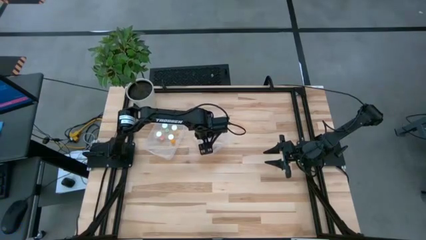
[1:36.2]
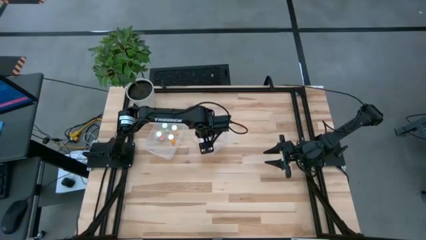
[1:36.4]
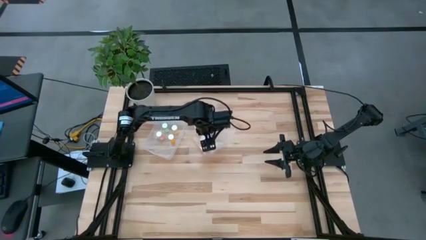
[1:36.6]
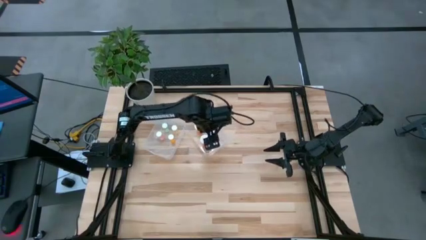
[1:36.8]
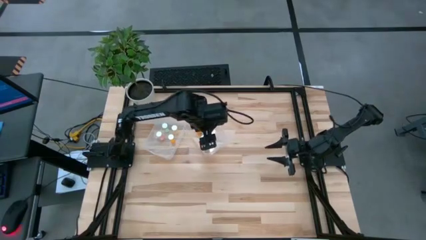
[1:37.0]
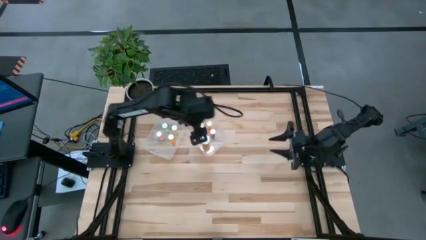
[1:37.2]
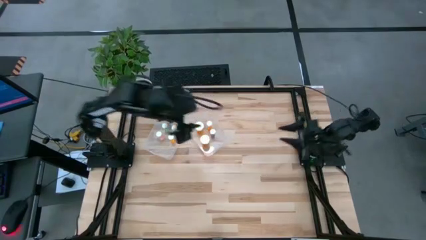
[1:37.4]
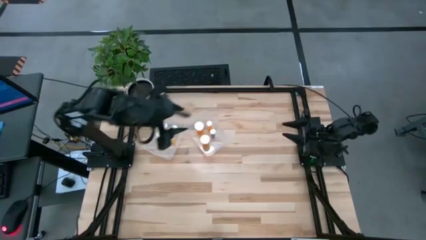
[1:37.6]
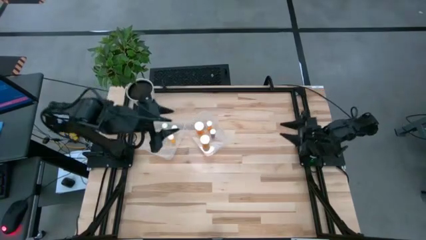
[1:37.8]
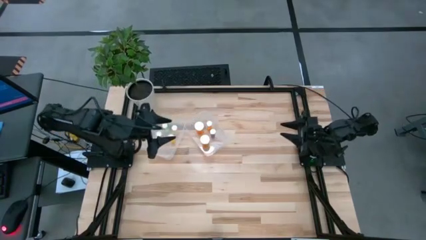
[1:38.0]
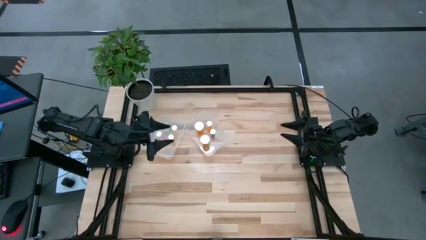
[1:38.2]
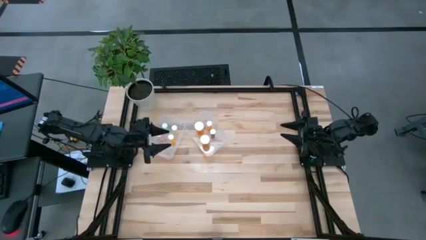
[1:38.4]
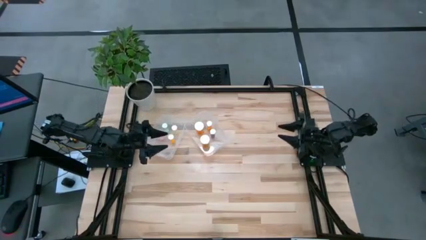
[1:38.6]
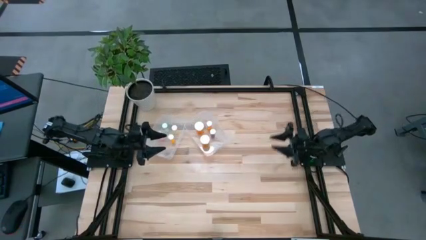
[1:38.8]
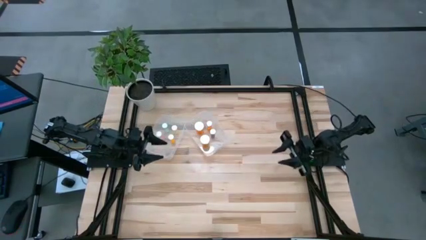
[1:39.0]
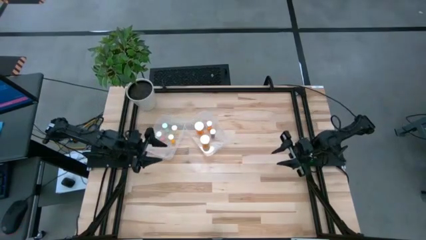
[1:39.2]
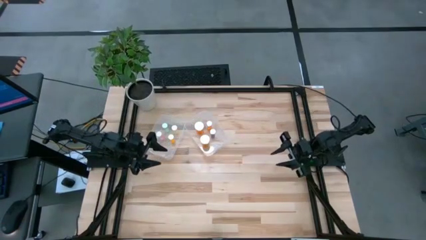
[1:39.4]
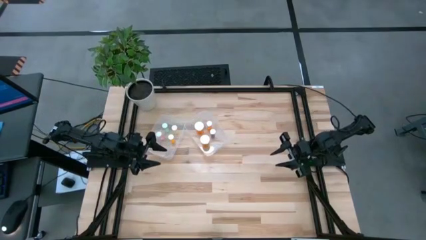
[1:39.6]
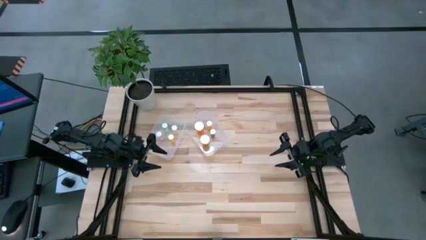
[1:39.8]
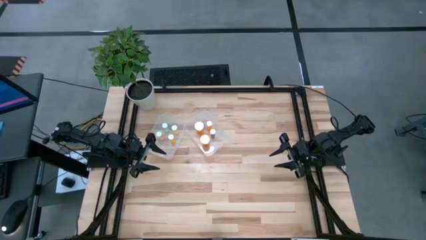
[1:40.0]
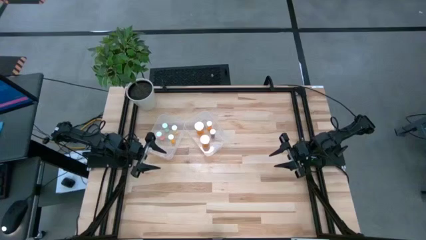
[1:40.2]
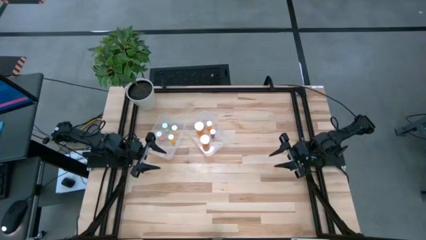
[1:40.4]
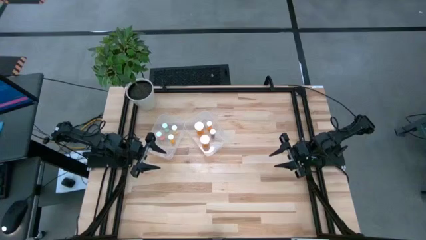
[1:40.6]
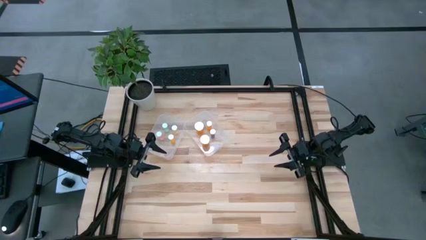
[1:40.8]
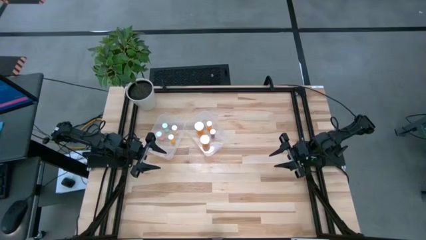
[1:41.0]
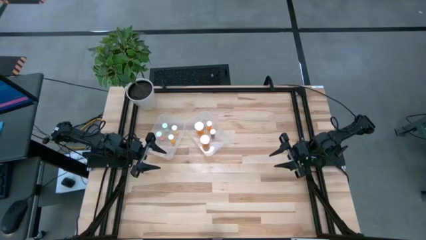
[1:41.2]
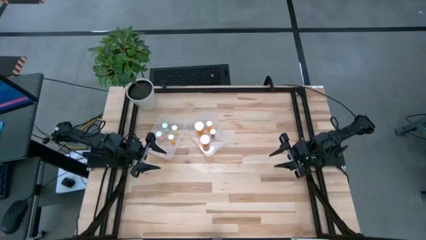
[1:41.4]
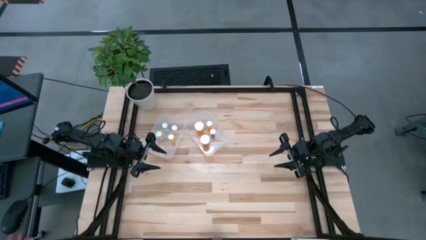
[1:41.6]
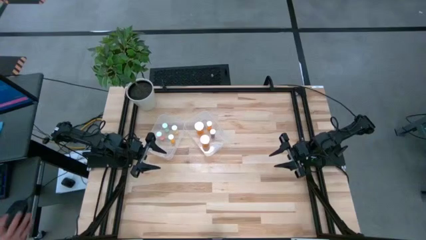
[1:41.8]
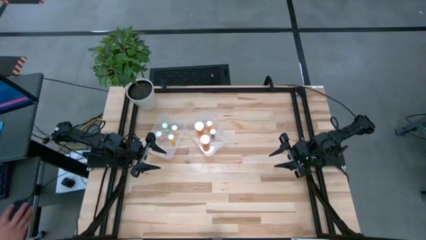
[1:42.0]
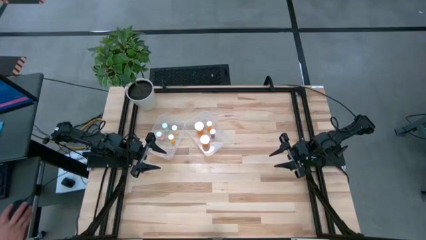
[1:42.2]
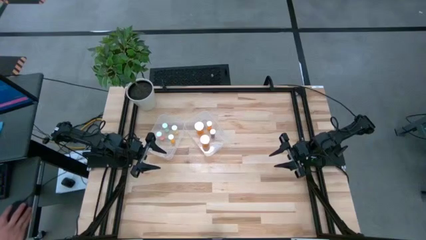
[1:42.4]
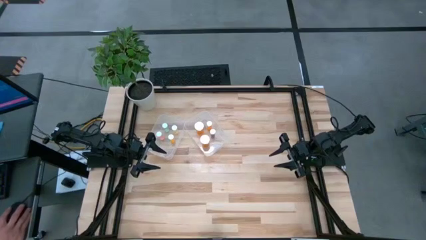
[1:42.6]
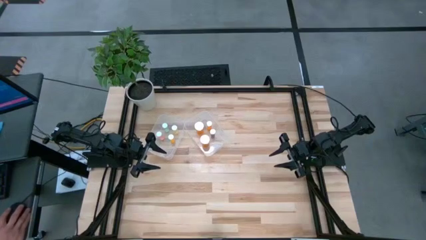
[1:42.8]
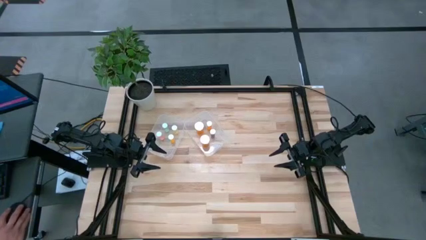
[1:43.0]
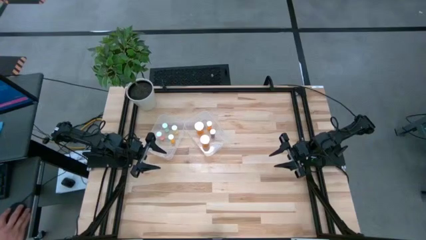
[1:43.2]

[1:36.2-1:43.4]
Task: Pick and place medicine bottles into bin by pill shape (circle, oval)
Return to Home Position

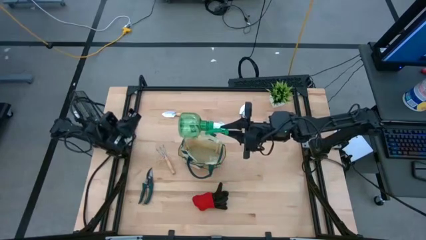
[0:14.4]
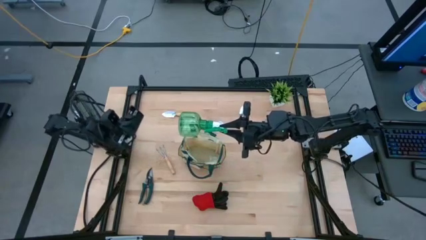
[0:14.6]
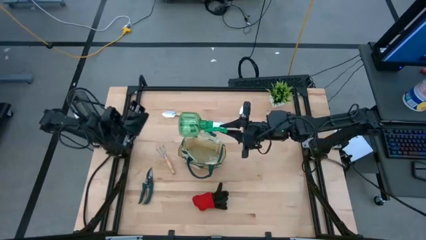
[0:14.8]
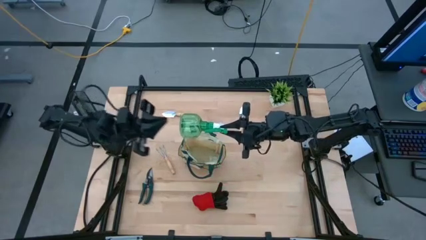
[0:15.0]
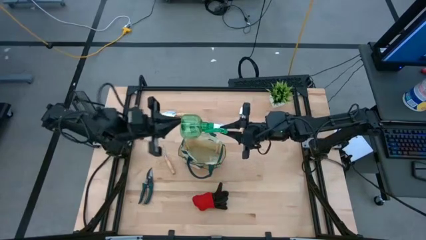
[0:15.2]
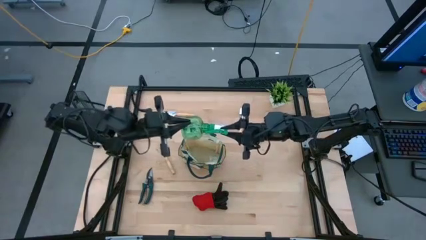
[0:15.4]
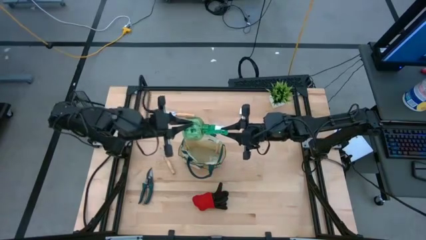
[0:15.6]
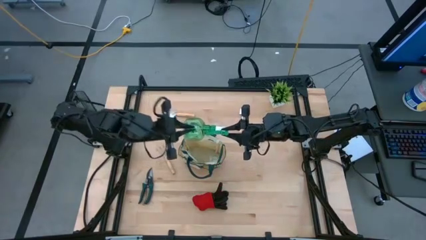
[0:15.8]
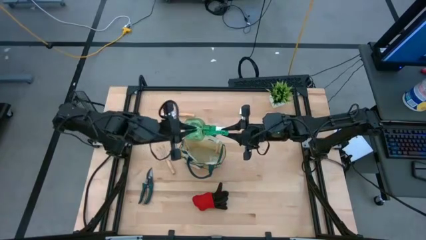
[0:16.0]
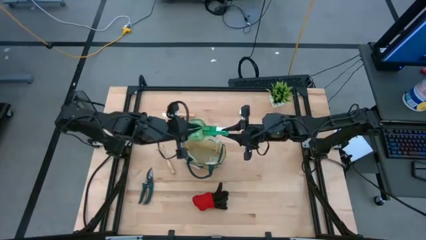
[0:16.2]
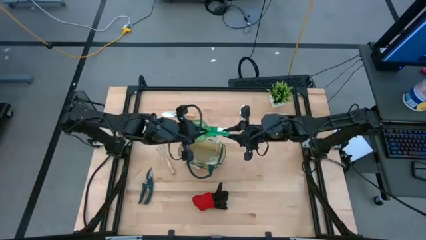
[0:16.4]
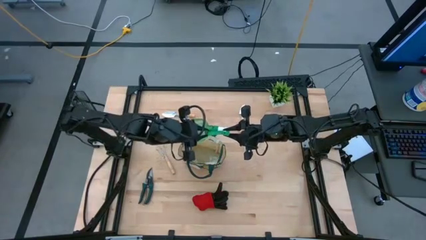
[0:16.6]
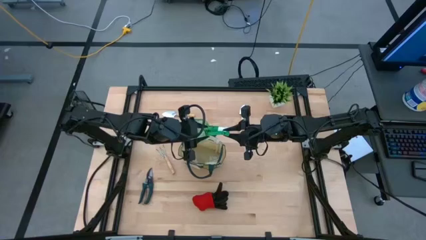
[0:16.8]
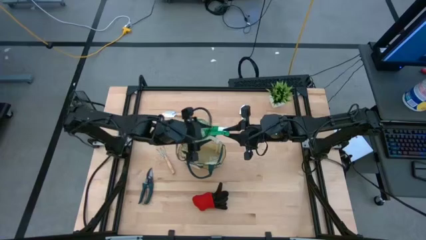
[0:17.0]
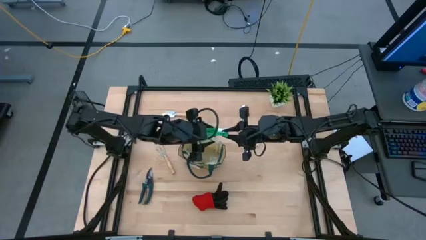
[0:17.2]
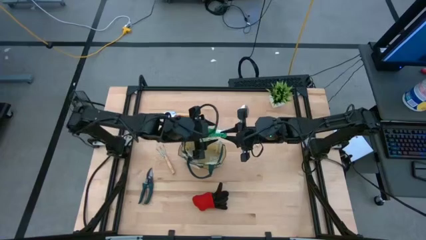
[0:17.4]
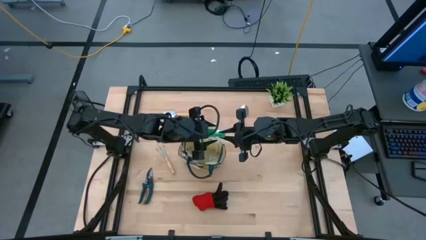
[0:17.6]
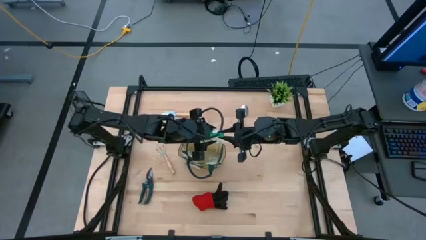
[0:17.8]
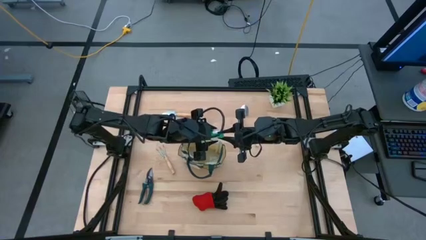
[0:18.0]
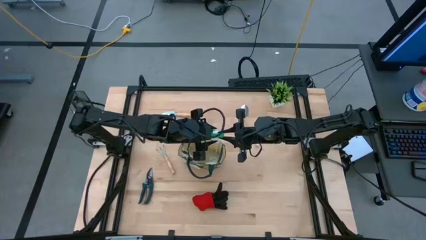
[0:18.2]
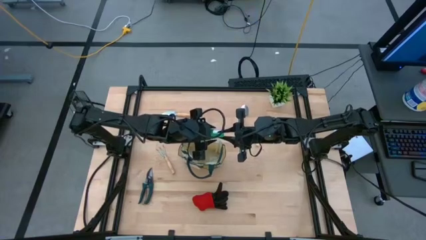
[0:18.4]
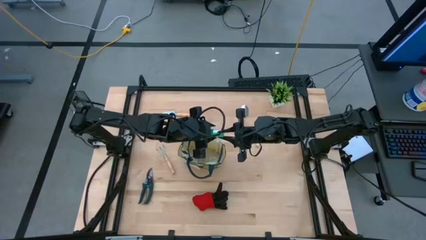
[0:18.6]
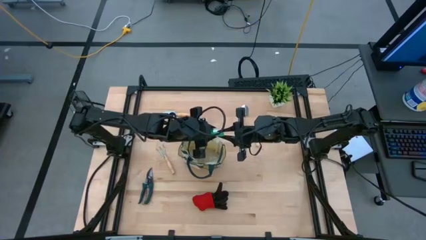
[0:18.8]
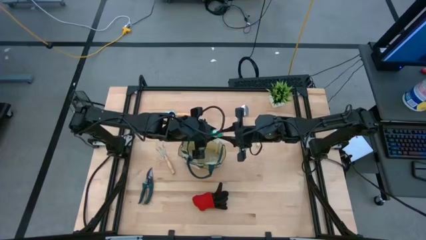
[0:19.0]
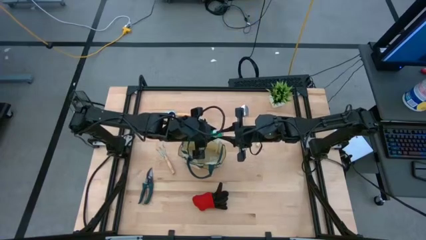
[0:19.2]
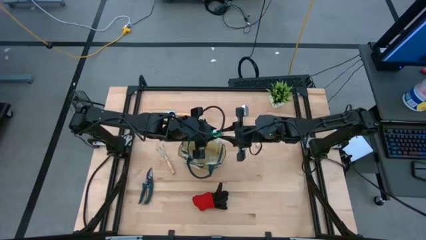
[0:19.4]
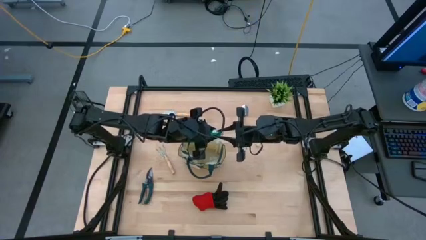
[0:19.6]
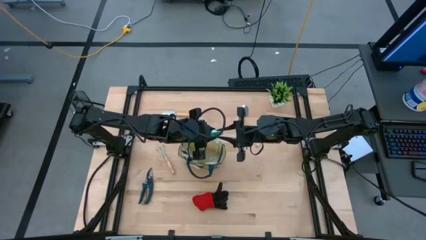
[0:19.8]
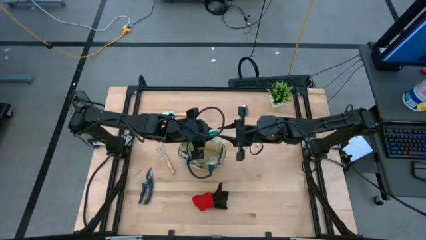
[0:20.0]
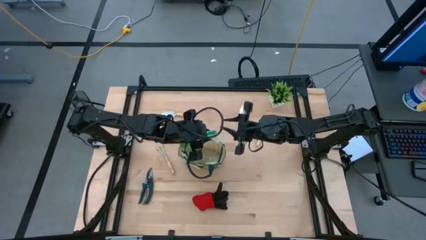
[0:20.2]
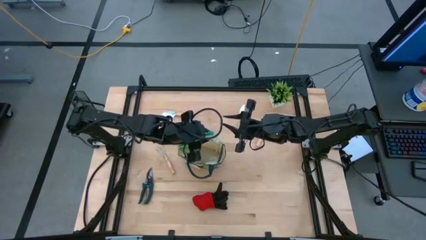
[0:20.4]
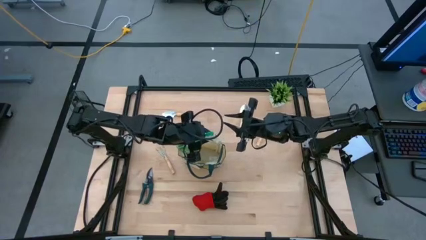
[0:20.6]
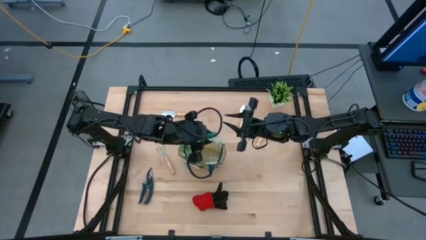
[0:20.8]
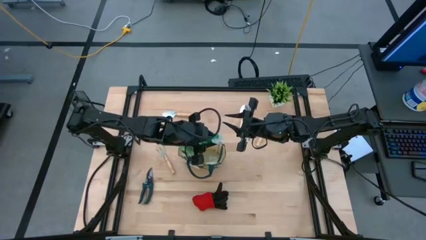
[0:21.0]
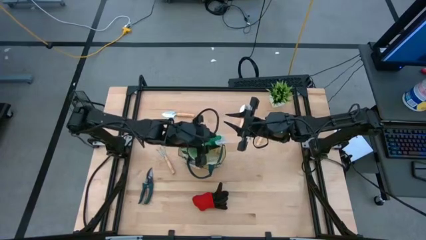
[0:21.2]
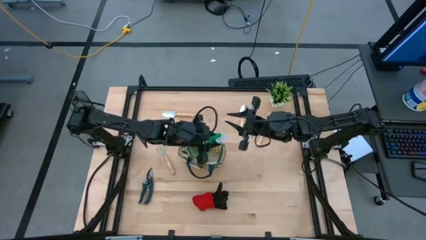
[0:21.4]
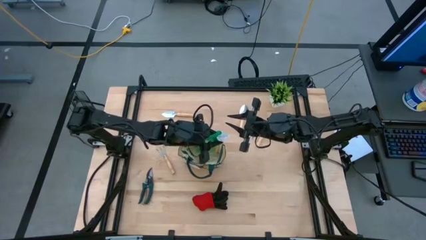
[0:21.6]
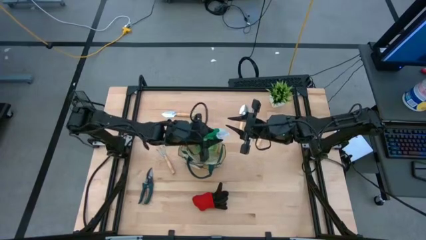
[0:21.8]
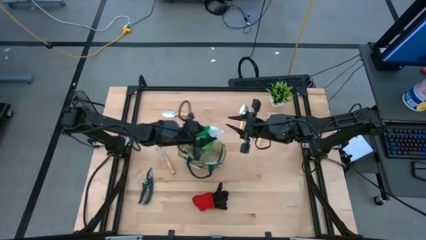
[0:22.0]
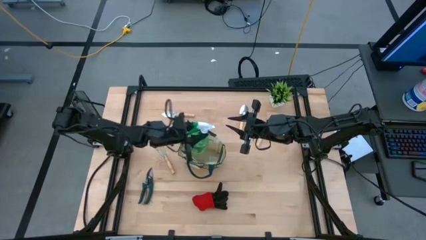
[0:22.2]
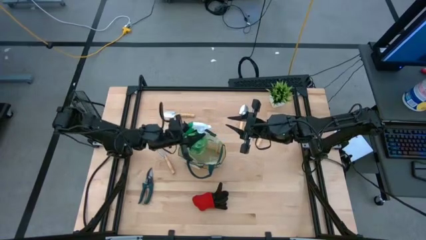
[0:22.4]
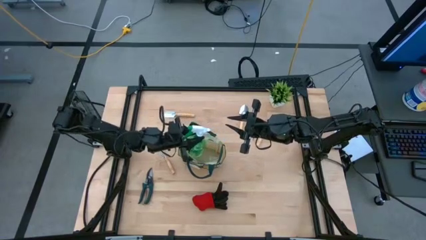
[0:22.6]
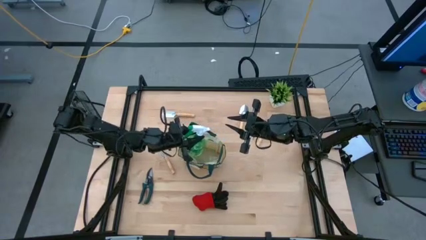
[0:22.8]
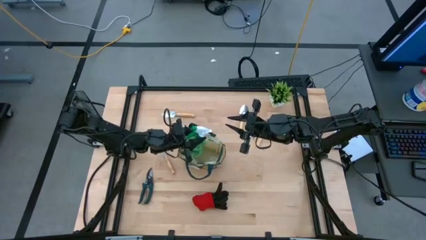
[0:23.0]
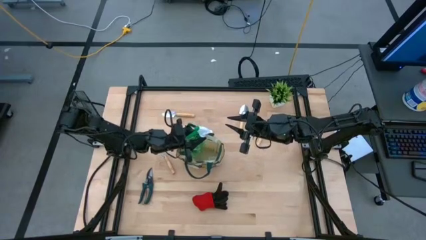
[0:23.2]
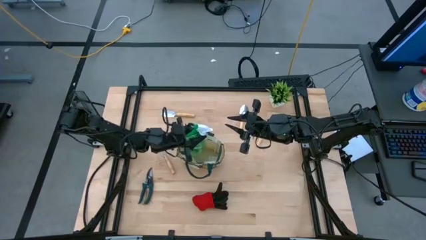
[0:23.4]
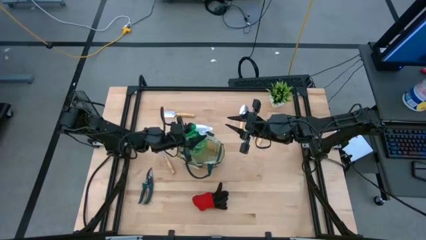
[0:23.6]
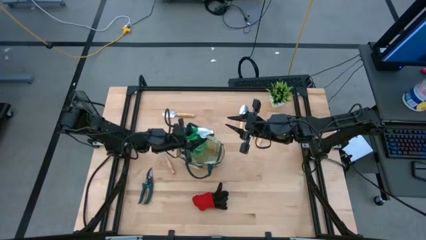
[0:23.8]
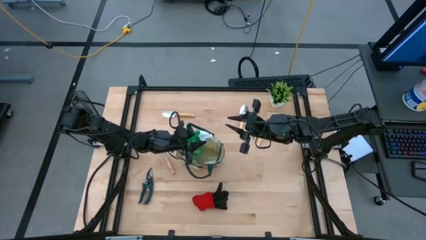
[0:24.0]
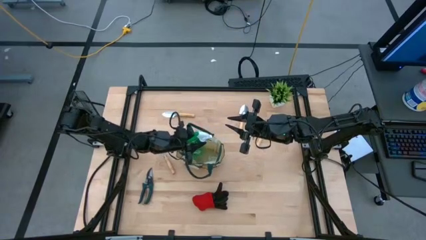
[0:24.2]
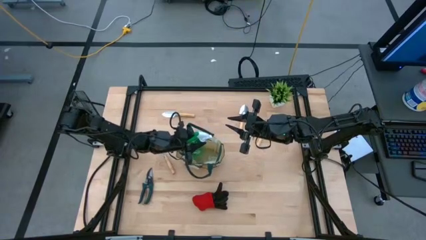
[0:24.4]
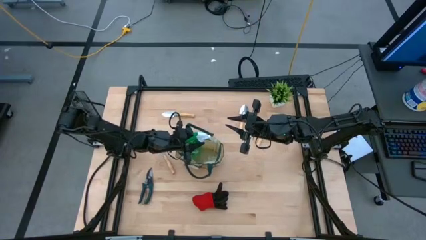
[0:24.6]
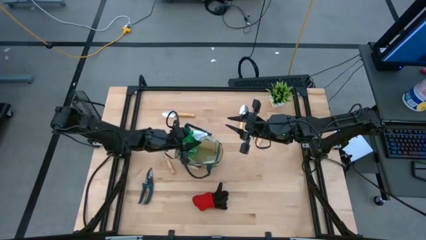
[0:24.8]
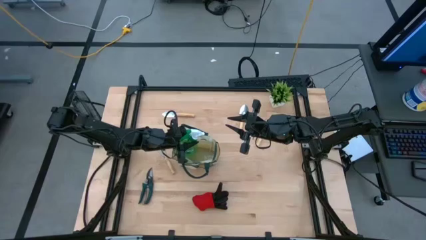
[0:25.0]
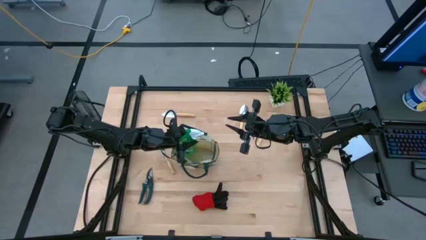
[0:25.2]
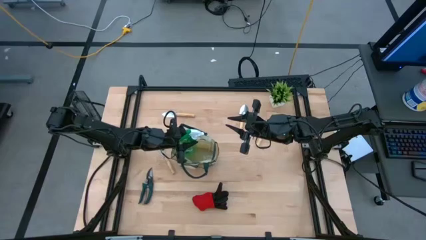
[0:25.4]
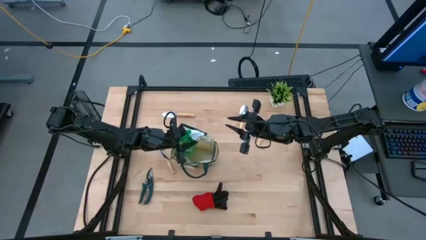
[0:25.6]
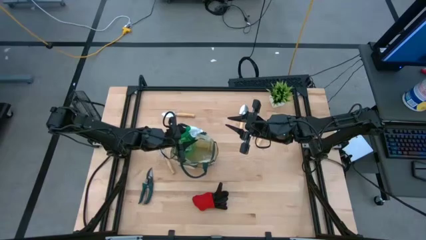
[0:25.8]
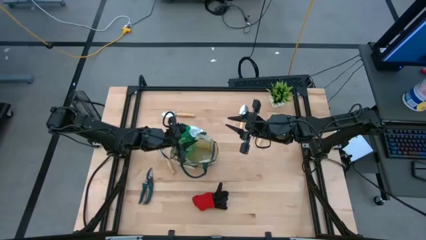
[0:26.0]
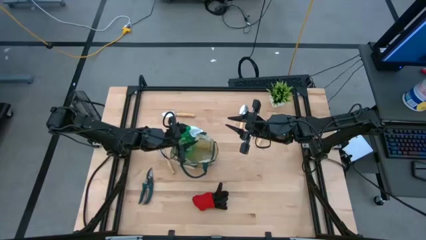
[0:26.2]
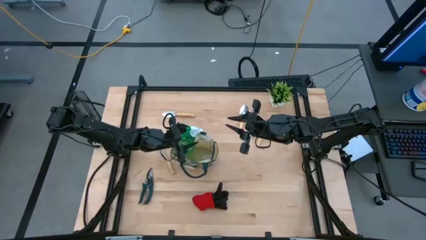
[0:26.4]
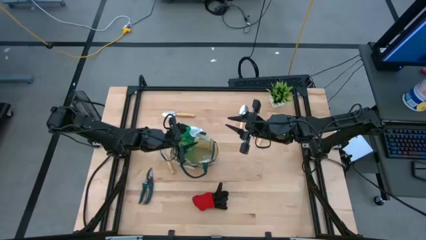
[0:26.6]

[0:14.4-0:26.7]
Task: Pick & Place Garden tools in Gardening bag
Put the green spray bottle into the brown gardening bag
